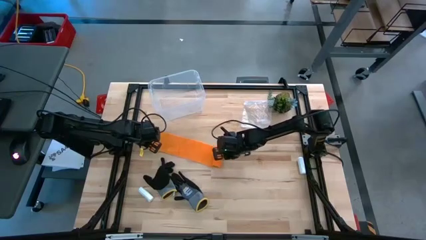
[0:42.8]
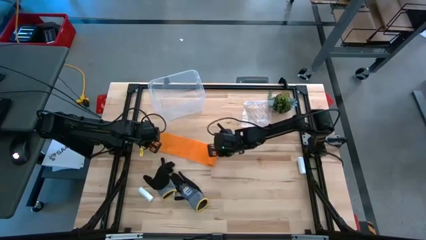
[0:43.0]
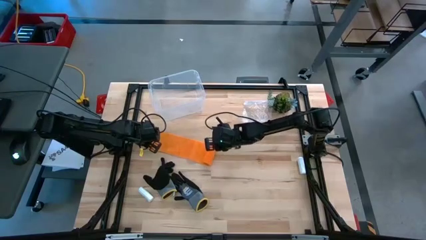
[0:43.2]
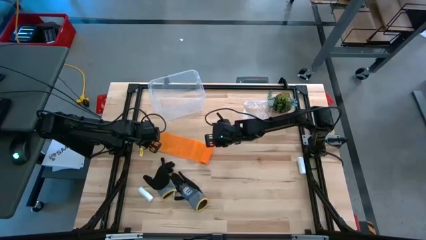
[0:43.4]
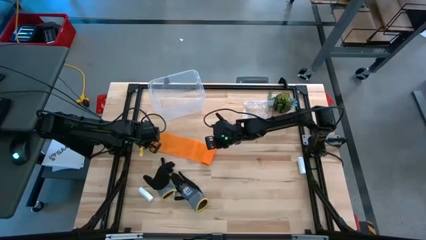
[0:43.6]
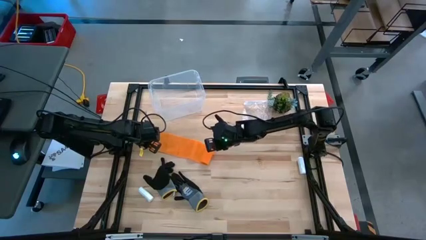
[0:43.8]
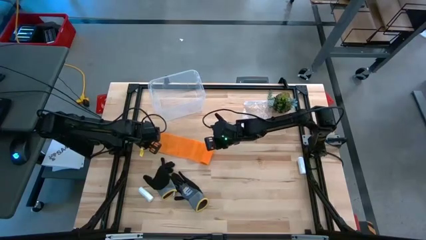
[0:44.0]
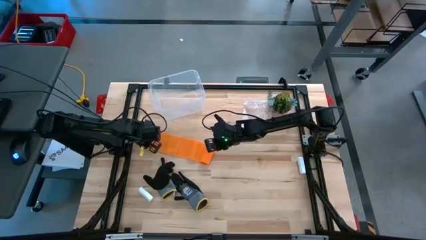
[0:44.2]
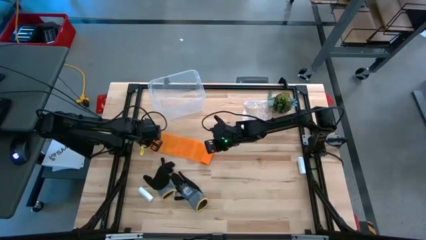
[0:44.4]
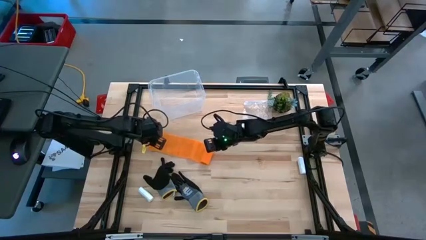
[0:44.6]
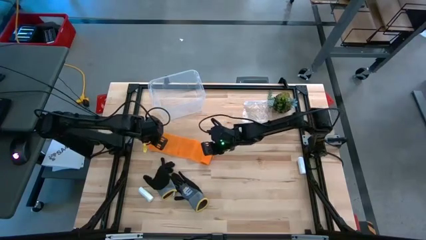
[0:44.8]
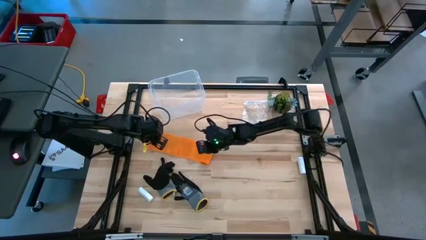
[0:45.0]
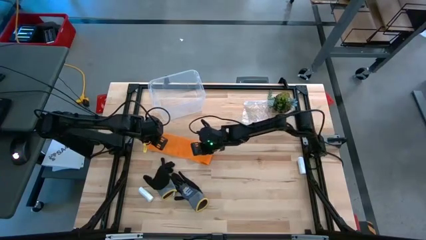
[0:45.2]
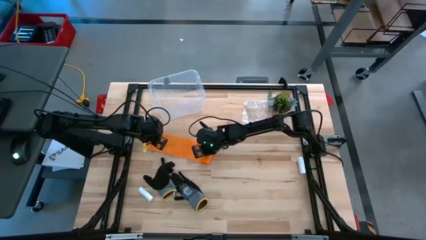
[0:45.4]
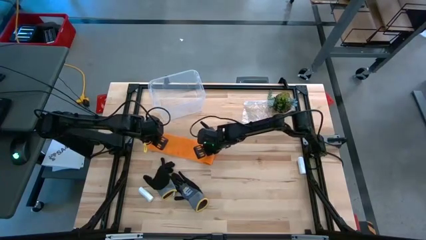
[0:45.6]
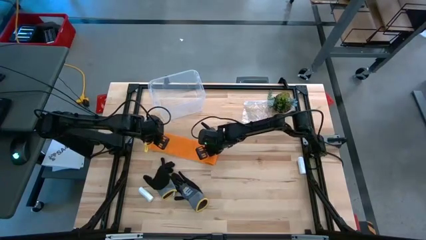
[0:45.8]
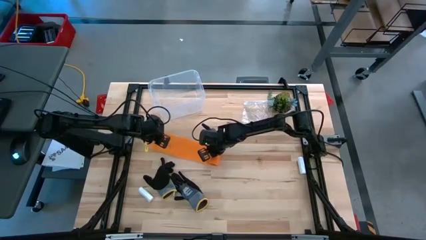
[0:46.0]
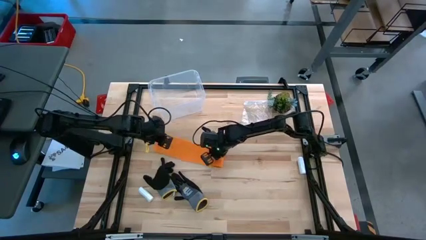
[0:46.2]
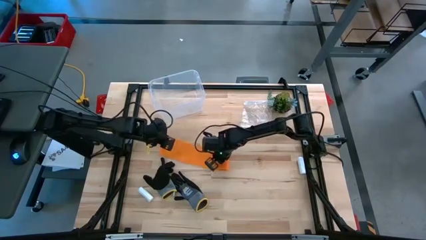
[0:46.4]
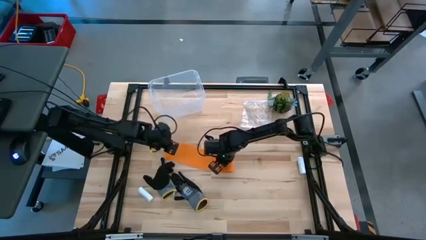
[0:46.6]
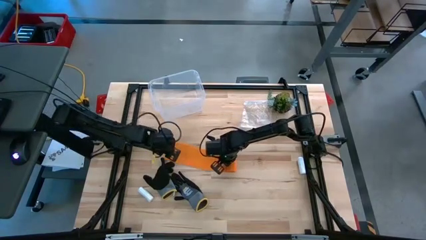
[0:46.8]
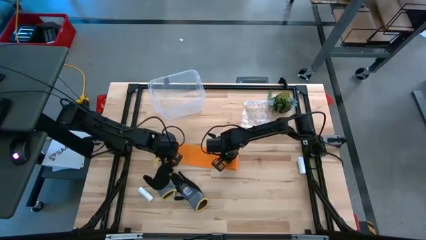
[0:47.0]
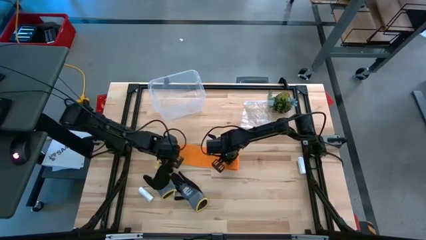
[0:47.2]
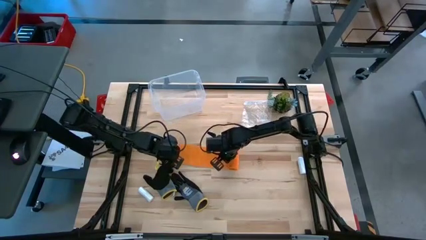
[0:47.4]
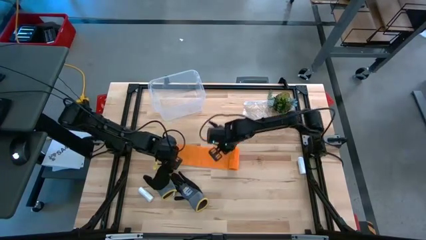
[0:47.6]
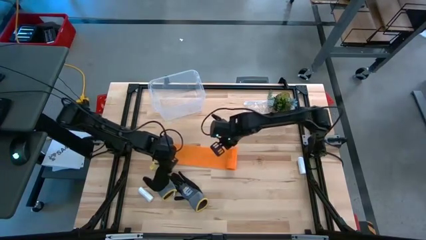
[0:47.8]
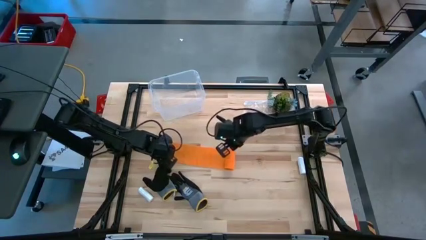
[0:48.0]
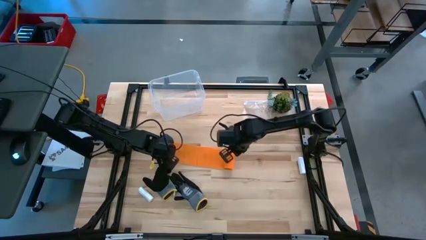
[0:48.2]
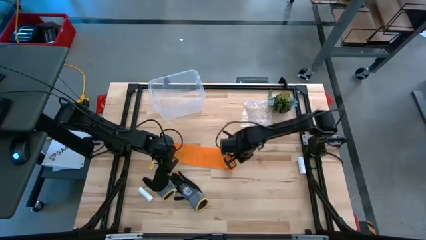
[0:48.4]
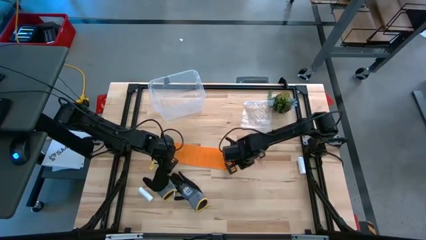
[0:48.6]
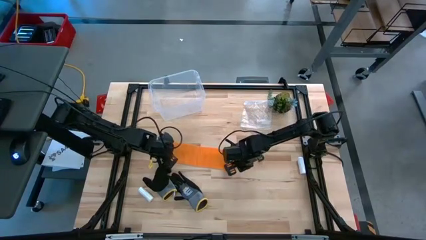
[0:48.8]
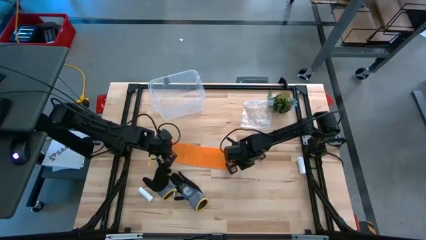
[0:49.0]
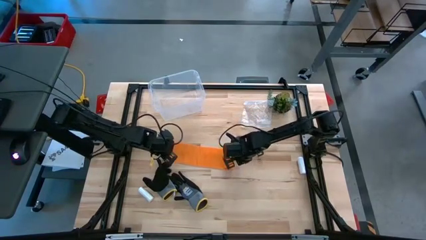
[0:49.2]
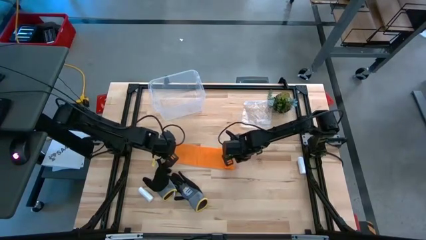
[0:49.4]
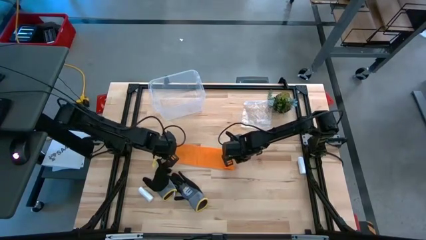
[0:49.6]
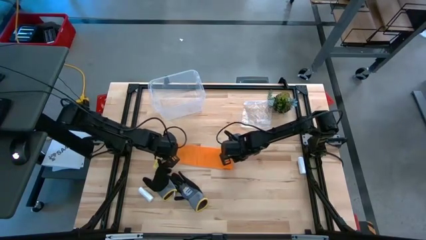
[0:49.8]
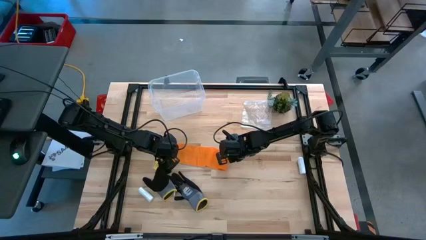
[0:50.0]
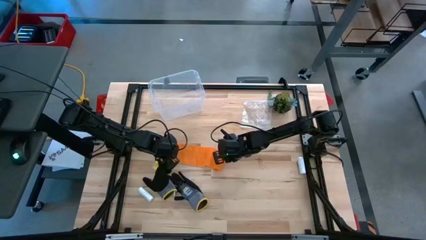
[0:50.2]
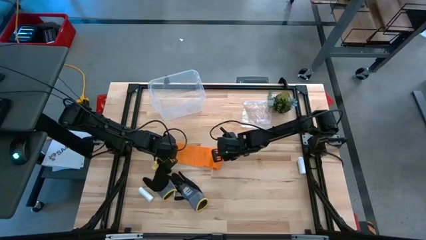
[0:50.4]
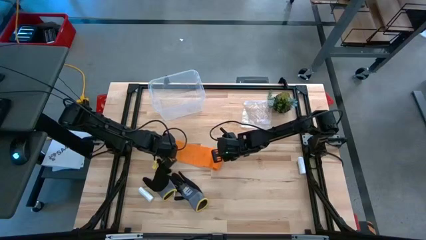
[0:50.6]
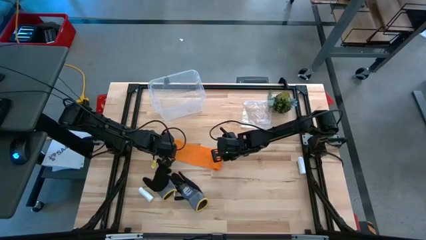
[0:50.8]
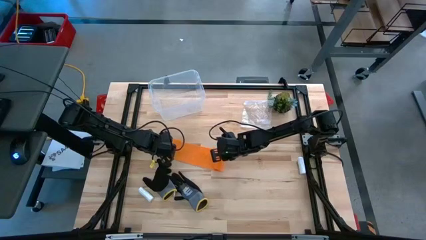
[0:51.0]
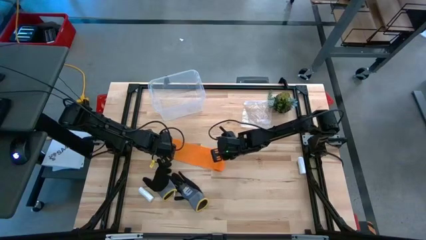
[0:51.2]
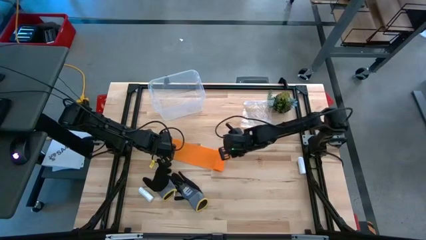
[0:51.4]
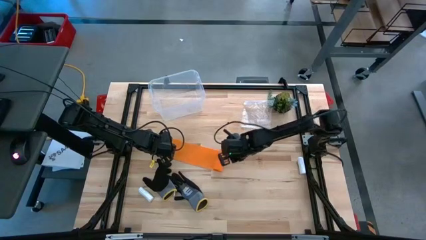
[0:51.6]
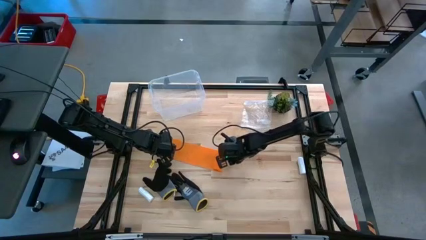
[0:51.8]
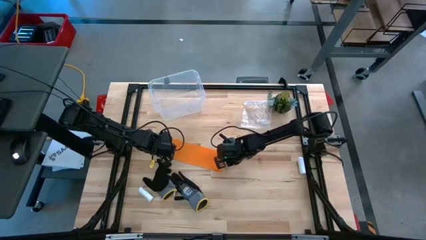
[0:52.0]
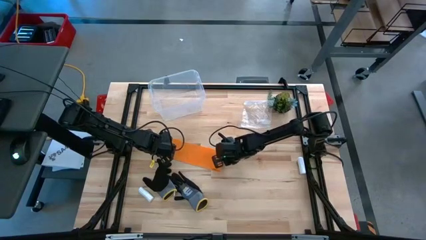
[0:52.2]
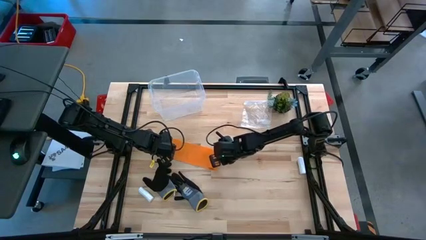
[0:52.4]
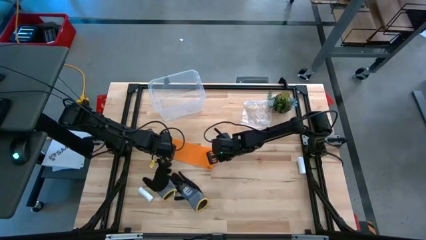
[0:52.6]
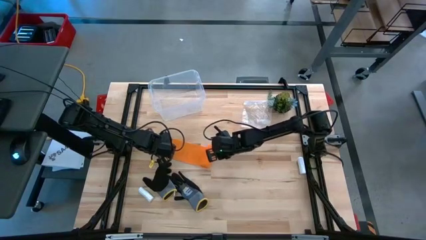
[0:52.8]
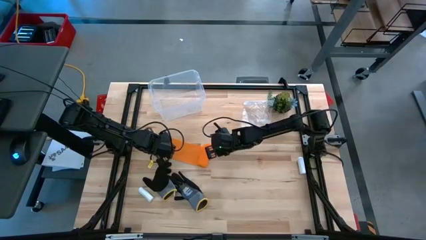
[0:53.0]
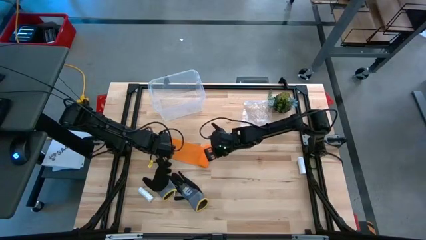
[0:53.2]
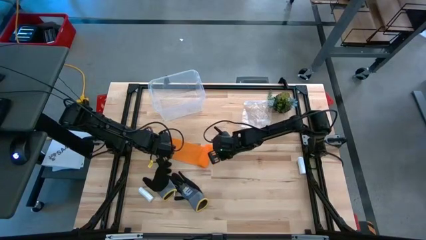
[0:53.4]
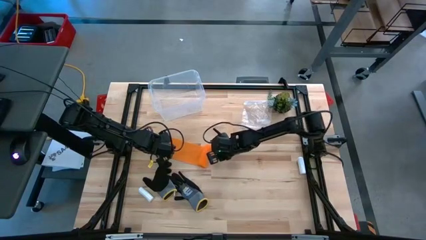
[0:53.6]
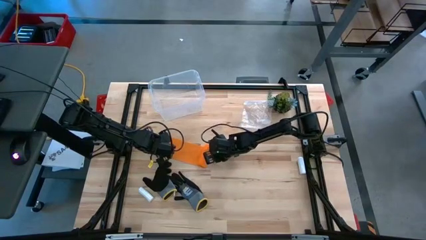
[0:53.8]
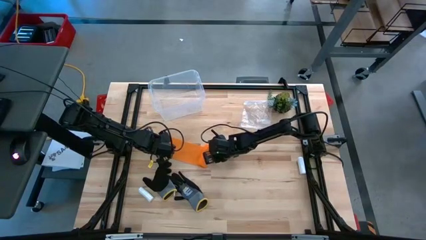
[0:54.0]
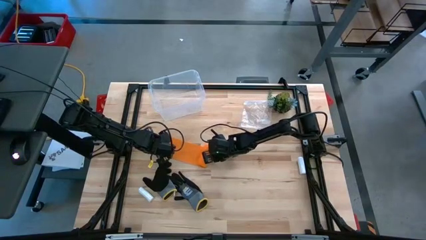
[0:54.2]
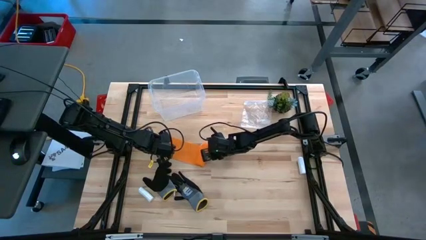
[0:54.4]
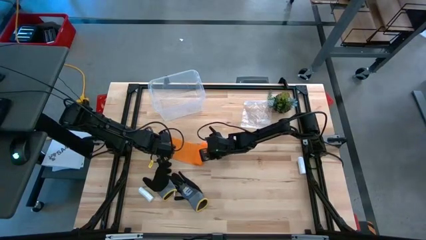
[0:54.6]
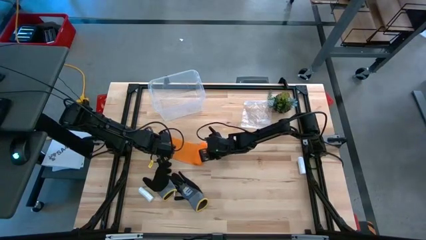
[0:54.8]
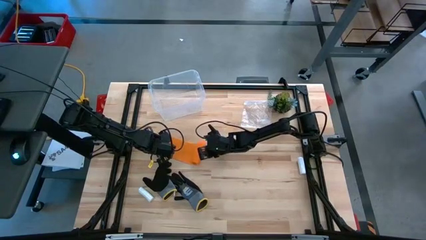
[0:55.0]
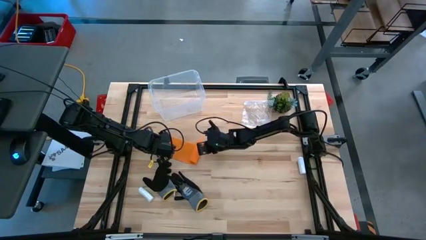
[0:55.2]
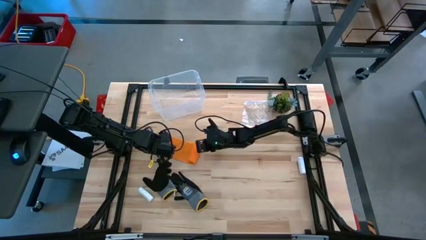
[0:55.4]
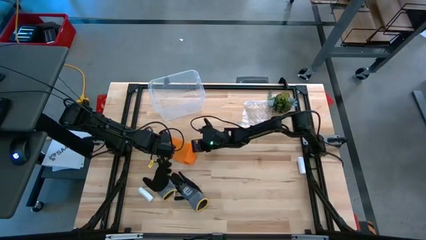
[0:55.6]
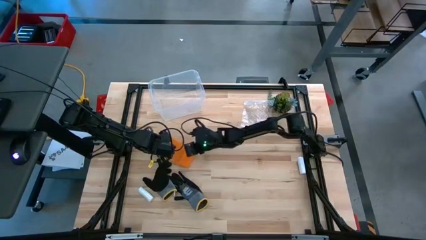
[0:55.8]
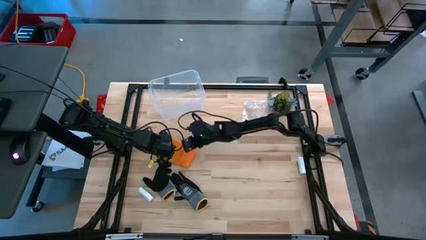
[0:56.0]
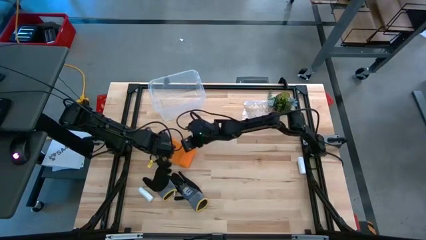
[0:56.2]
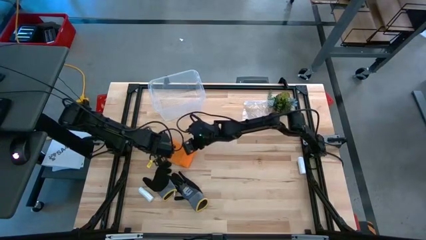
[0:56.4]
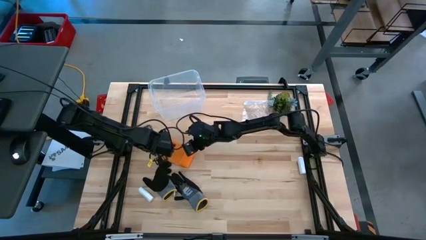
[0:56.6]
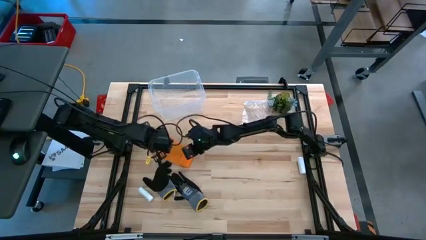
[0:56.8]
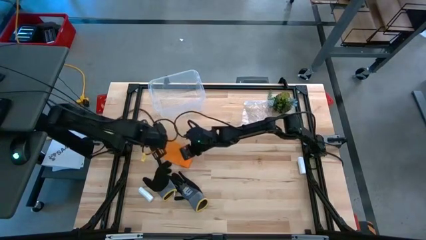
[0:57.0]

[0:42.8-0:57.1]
Task: Roll bandage
Roll the orange bandage

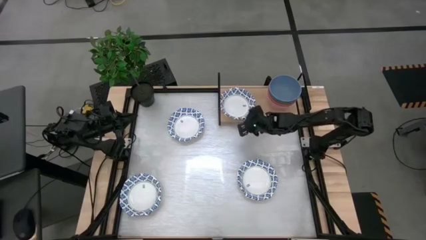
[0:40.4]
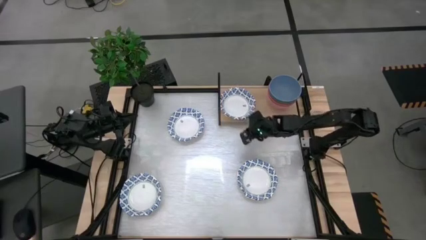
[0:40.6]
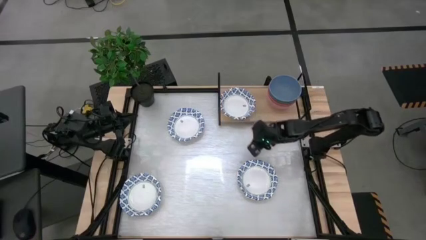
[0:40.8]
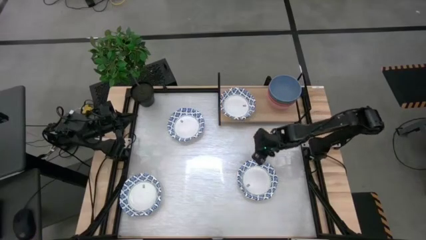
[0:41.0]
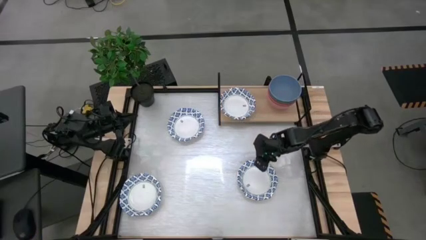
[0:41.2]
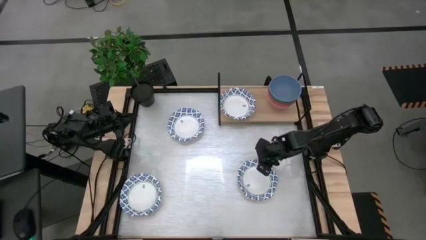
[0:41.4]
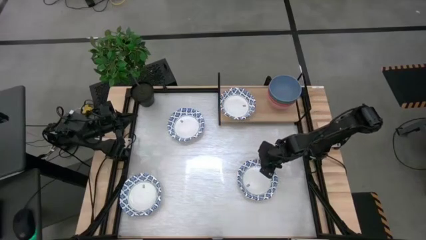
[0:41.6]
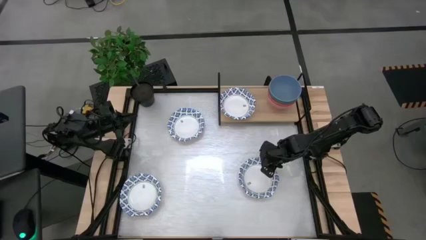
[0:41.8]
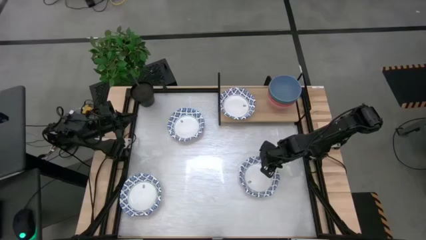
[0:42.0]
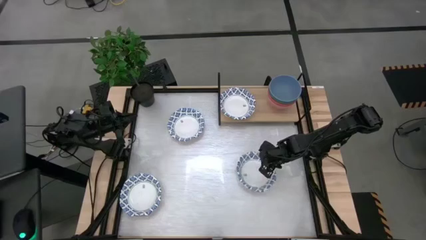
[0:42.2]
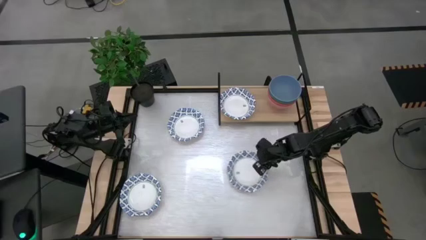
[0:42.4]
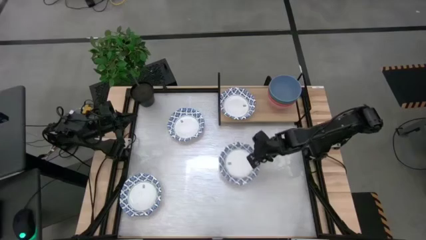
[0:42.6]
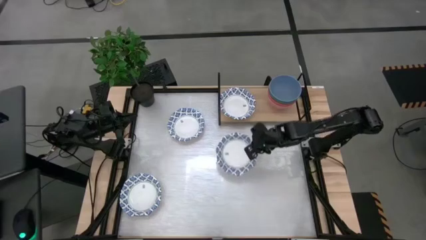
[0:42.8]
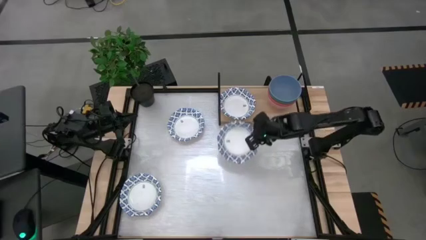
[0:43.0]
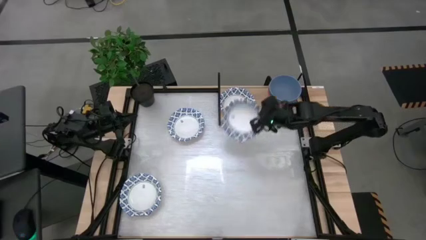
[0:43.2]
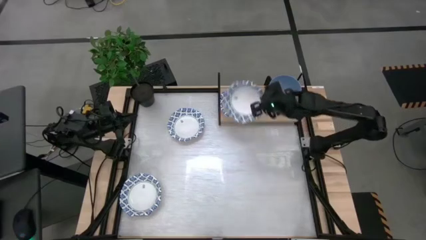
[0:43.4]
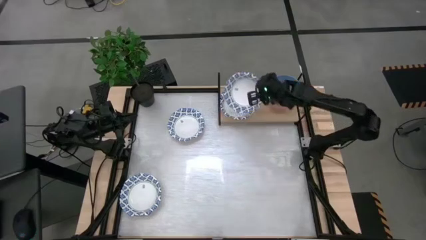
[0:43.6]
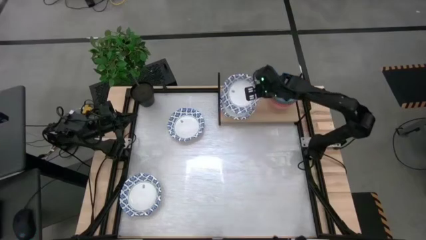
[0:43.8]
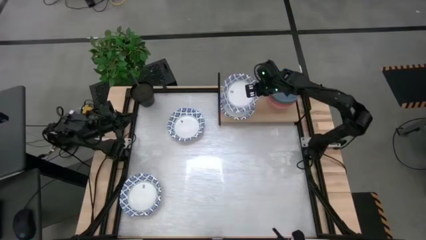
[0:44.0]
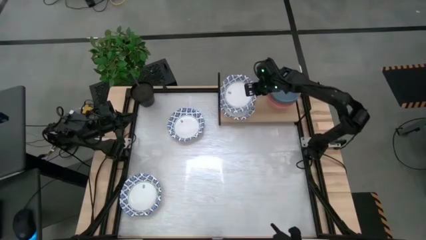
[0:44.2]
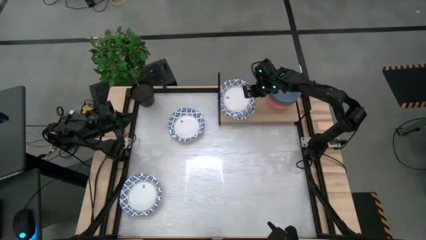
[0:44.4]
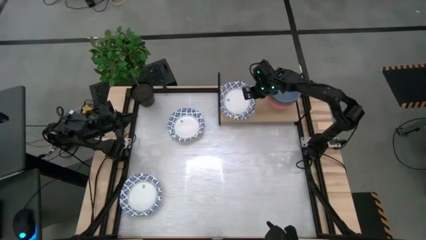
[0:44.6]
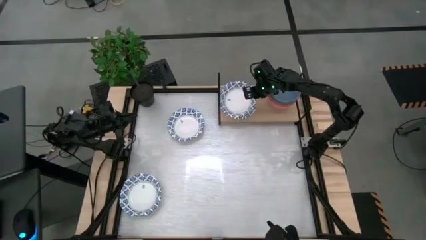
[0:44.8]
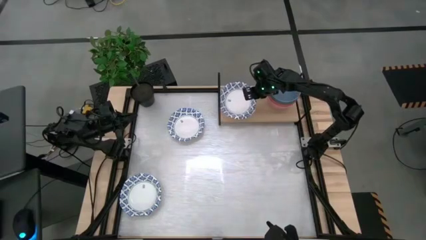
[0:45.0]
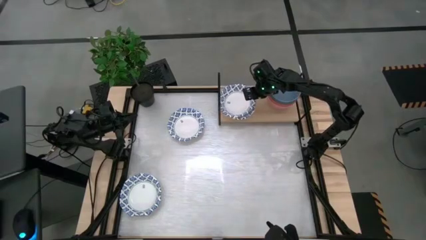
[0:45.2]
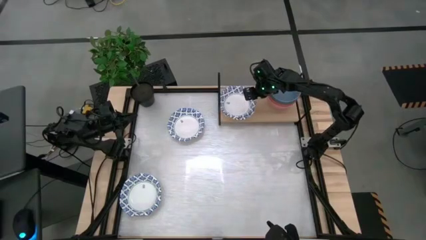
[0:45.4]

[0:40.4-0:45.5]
Task: Place and stack bowls onto a shelf
Stack the right blue pattern bowl on top of the other blue pattern bowl on the shelf
